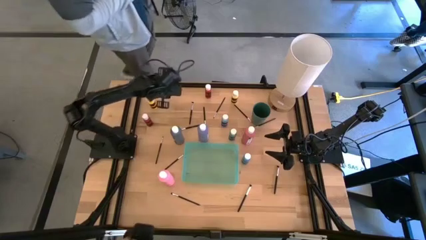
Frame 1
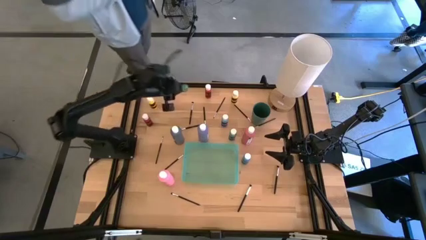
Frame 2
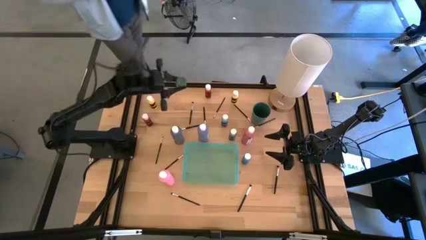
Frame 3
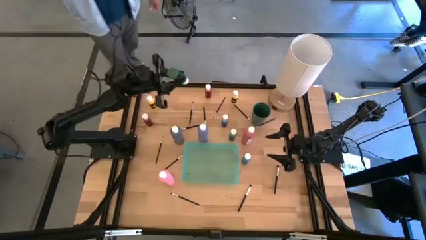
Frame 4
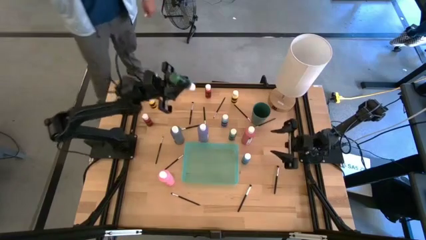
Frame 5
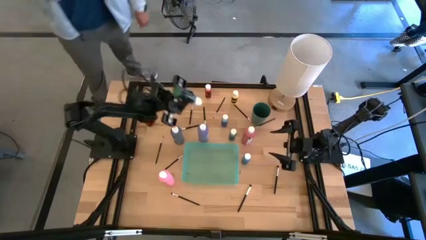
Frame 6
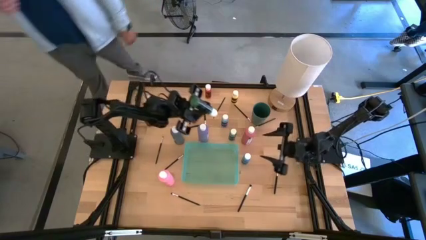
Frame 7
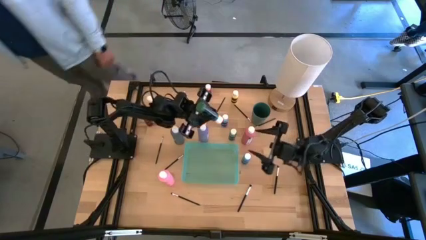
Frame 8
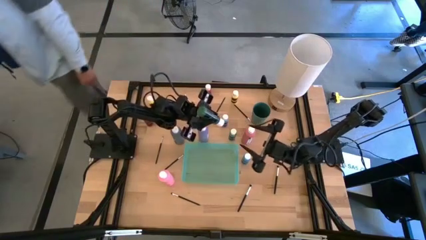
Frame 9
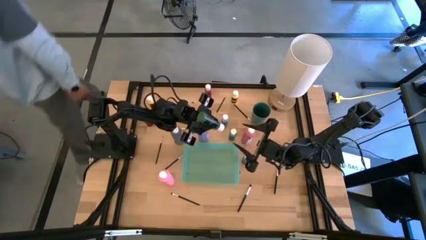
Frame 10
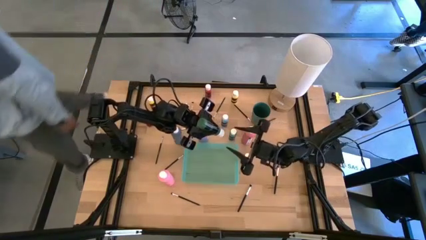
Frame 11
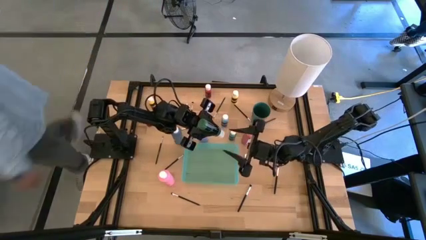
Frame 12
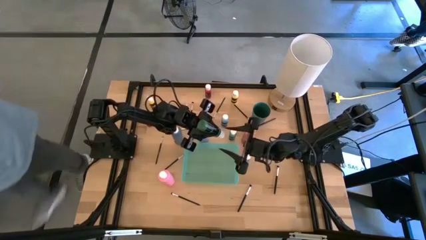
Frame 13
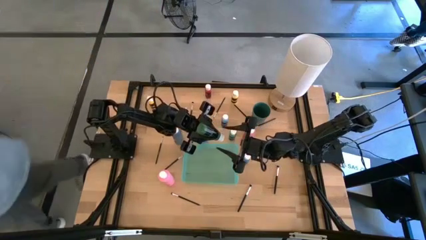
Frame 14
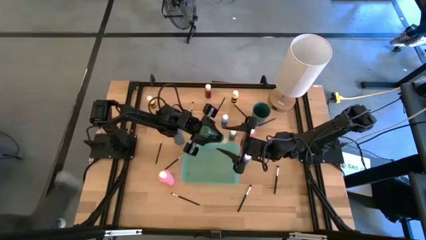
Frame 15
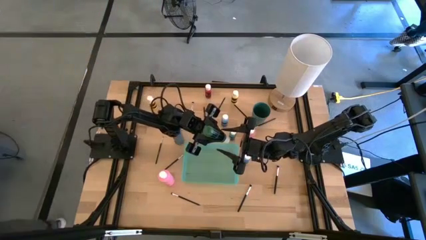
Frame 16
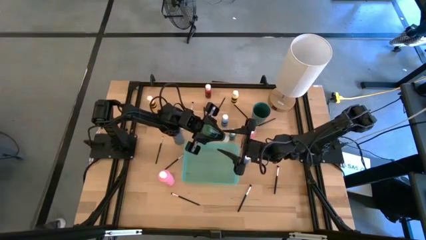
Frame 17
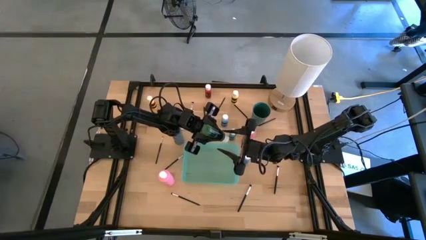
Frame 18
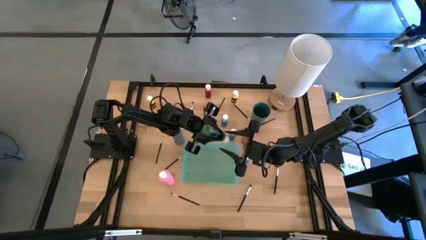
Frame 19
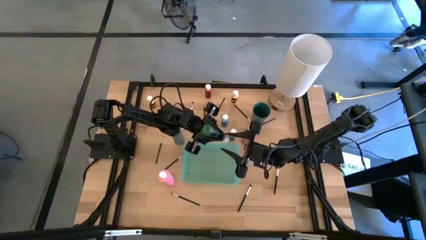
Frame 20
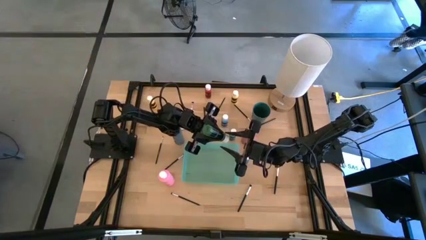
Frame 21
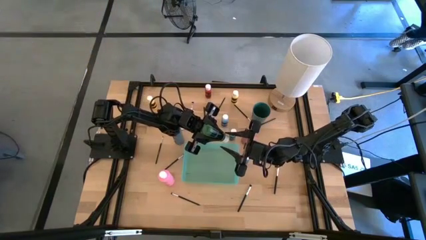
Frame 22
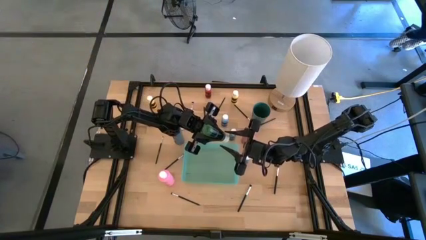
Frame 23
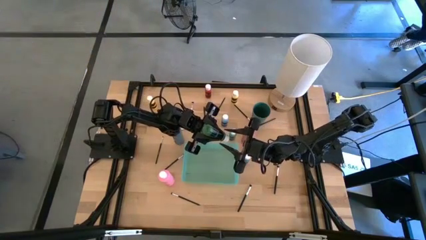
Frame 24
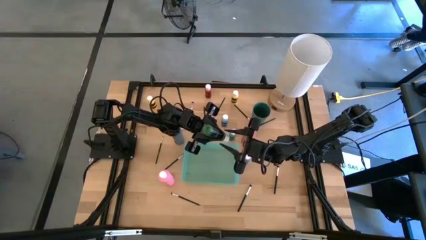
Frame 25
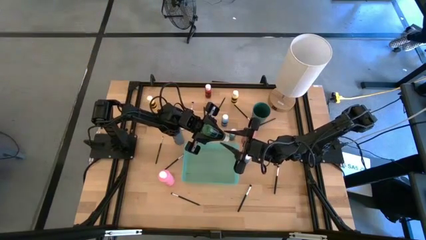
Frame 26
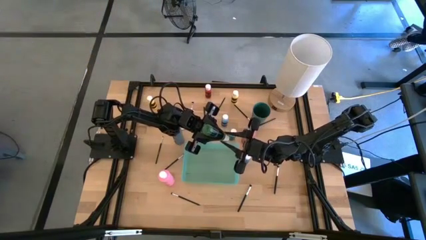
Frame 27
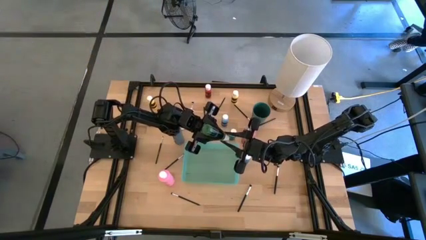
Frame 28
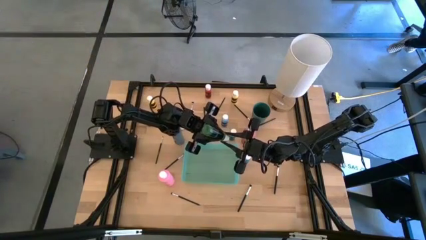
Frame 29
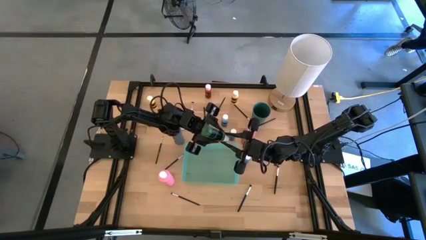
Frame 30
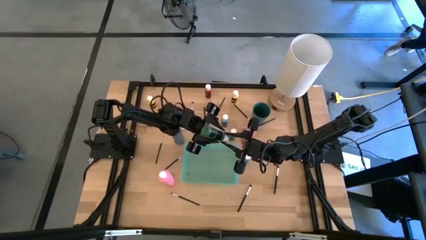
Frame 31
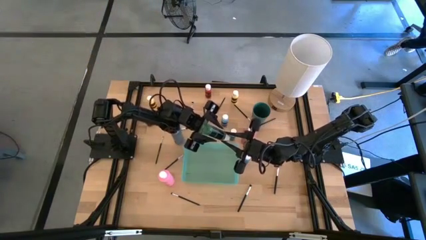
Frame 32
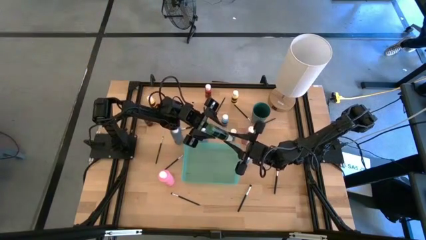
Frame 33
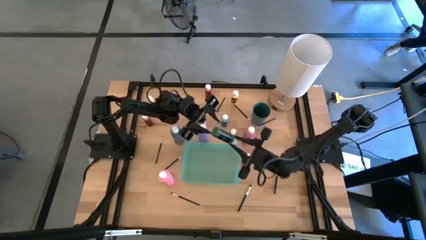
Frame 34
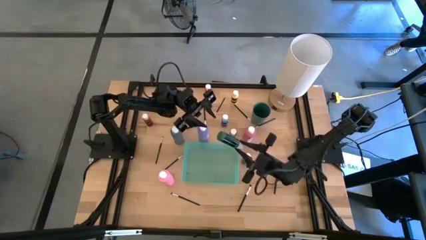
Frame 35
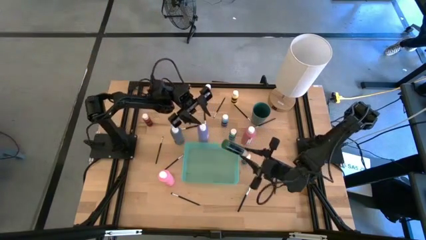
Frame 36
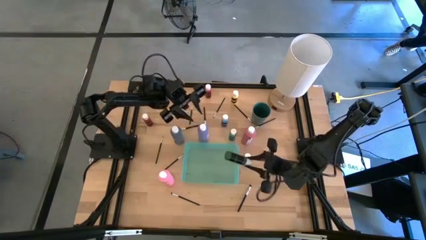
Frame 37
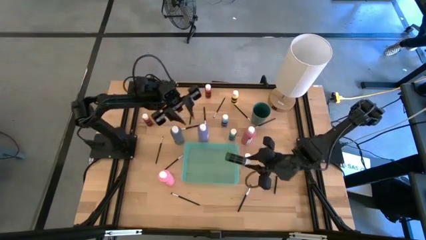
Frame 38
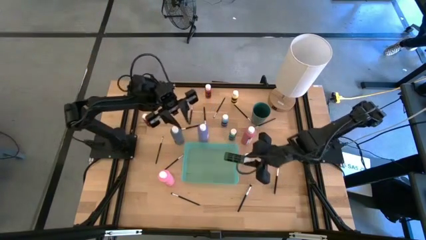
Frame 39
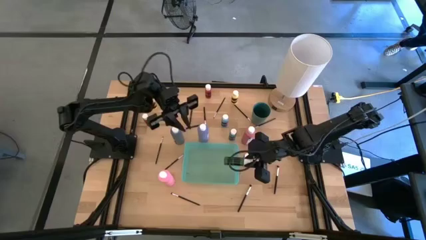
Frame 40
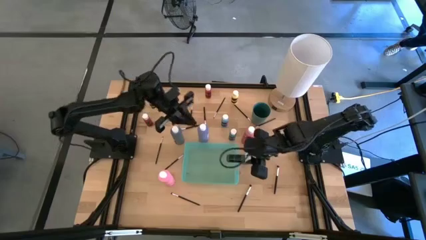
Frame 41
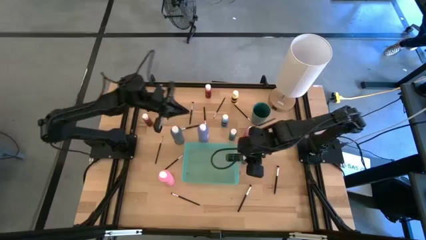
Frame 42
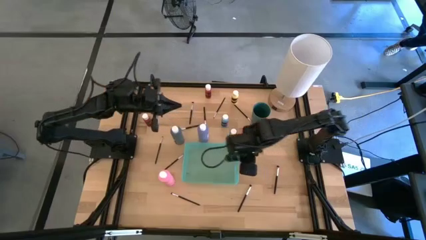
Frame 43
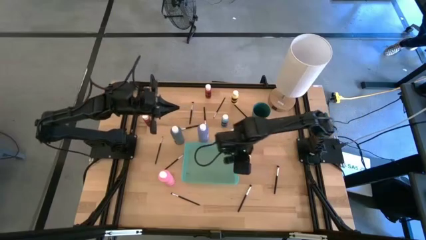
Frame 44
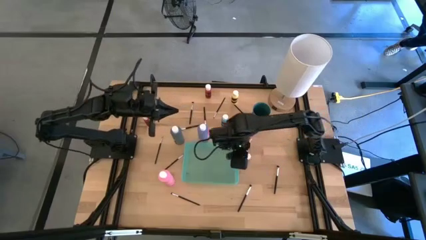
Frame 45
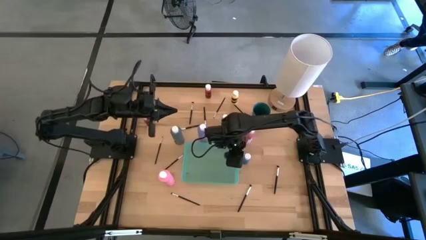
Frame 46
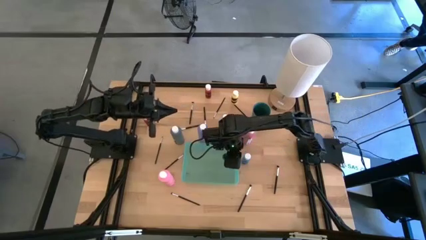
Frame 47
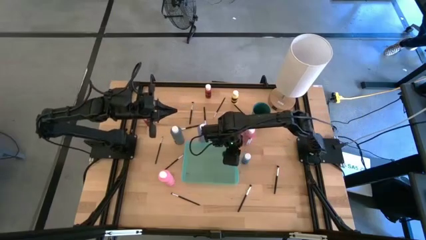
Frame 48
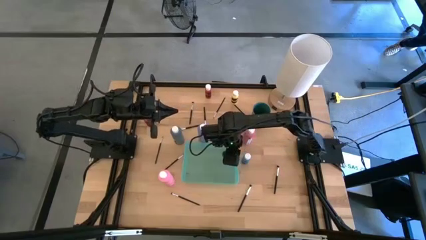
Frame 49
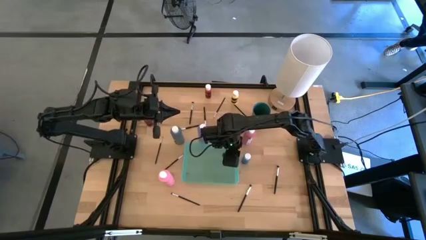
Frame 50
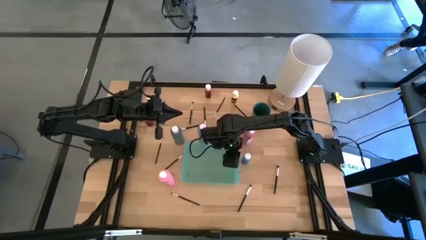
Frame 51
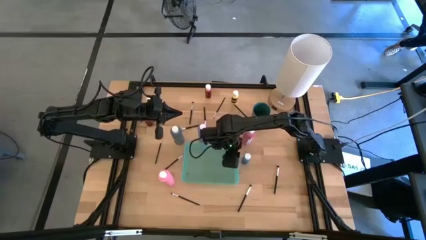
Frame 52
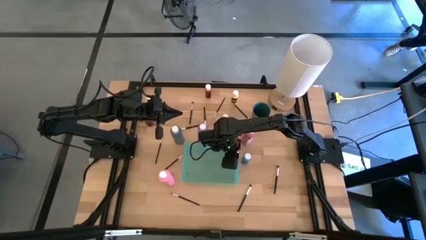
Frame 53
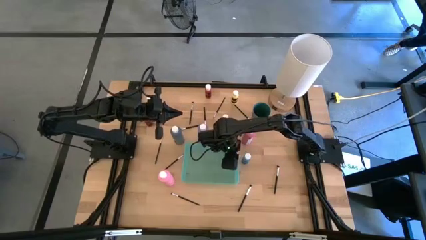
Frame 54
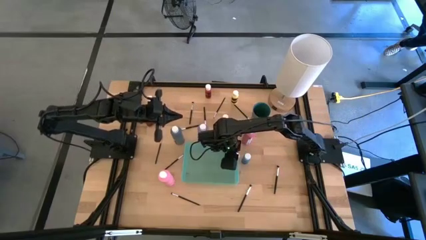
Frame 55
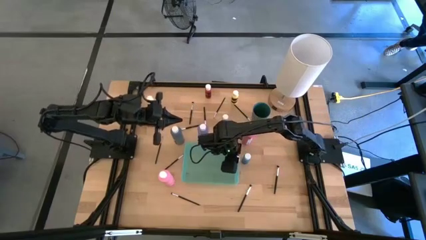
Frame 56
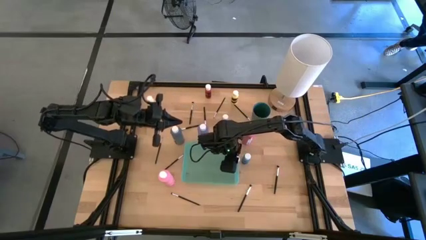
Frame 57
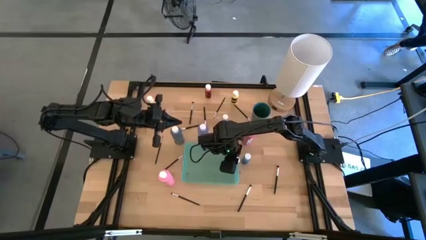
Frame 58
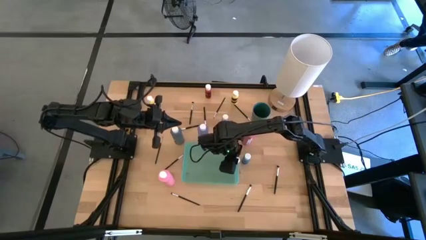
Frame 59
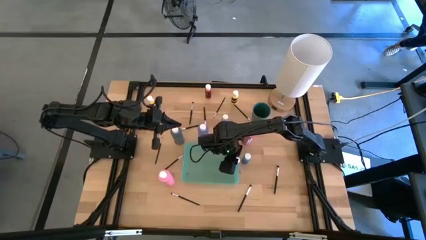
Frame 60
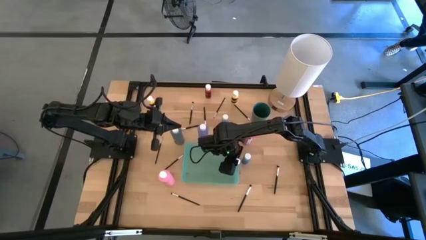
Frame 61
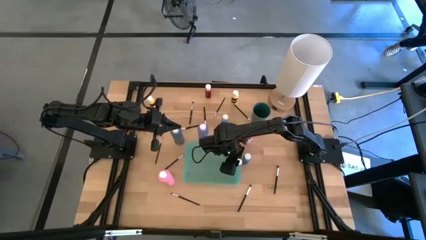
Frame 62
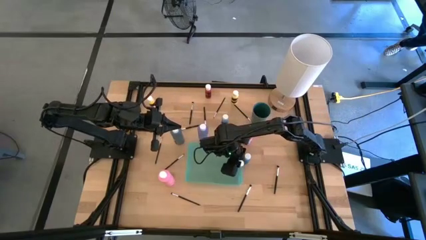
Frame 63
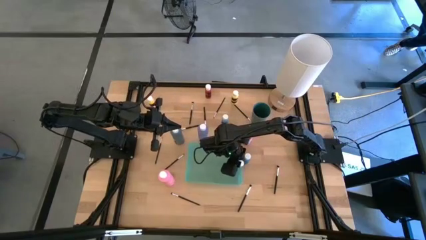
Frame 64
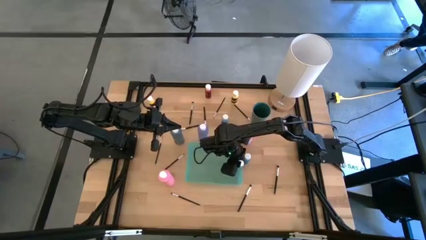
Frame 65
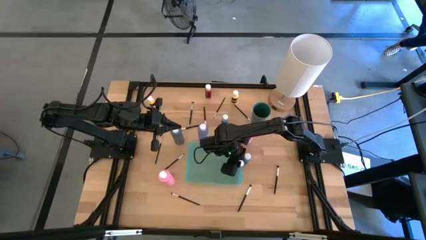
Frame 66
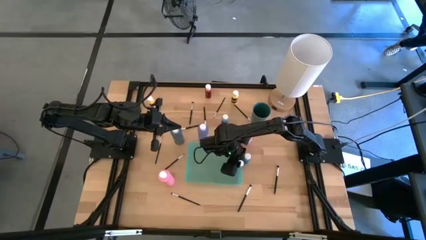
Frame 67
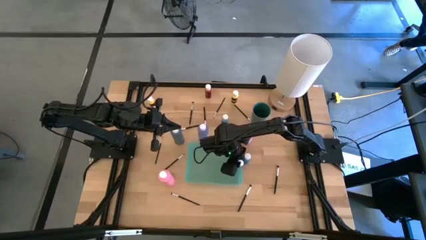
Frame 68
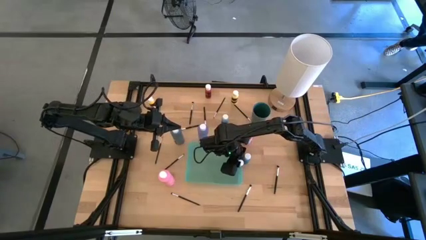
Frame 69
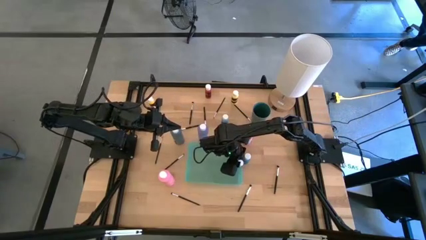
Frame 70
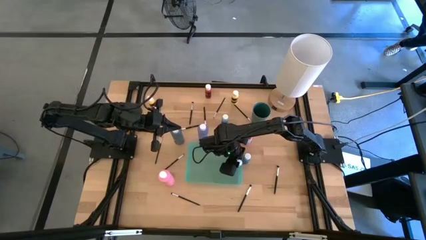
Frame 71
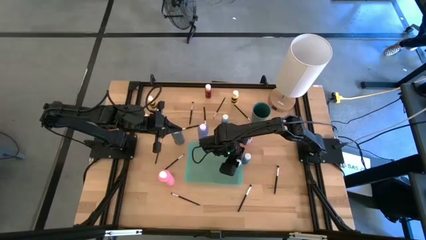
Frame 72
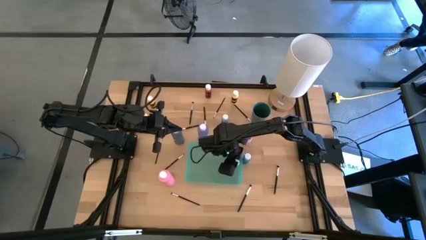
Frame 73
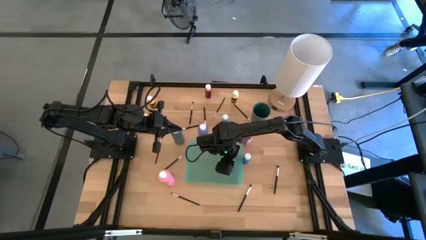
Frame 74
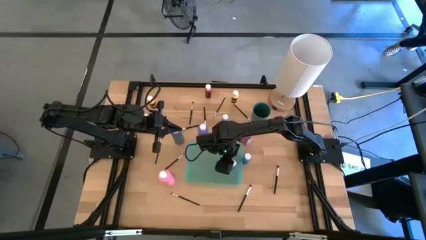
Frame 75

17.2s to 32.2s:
Task: Pick & Place Paint Supplies
Put the green paint bottle into the light green bin
